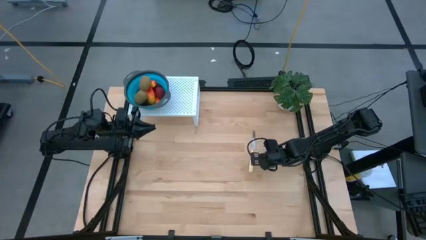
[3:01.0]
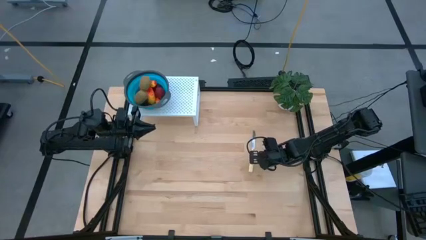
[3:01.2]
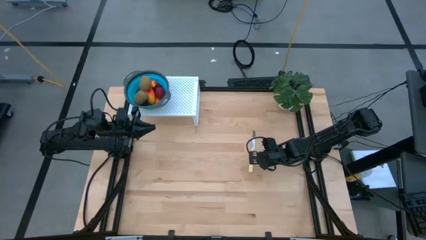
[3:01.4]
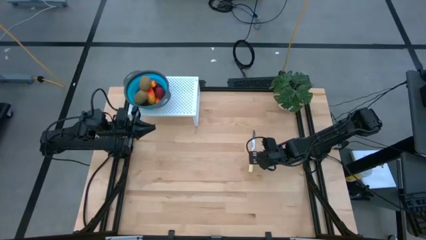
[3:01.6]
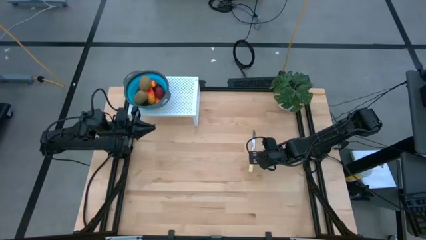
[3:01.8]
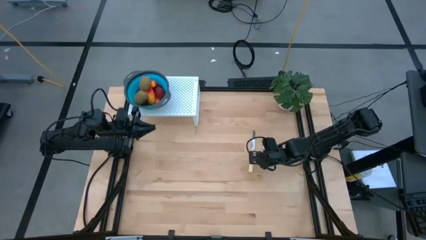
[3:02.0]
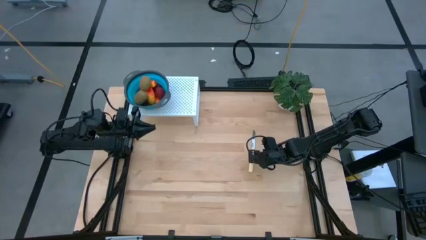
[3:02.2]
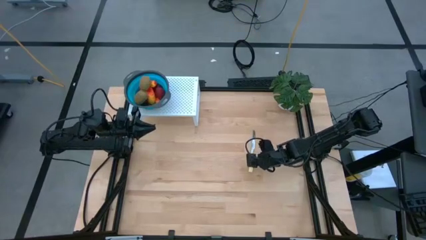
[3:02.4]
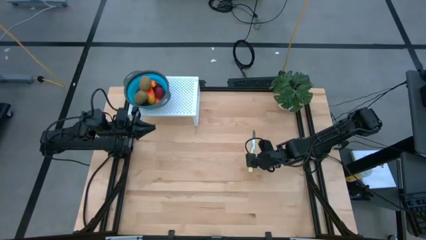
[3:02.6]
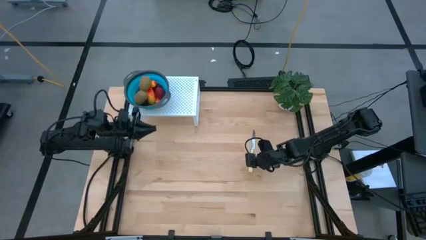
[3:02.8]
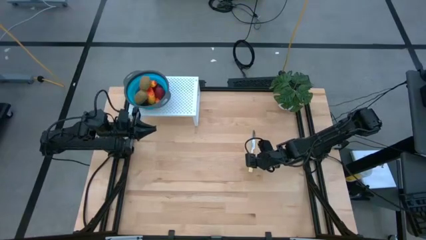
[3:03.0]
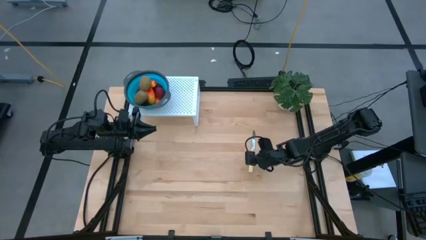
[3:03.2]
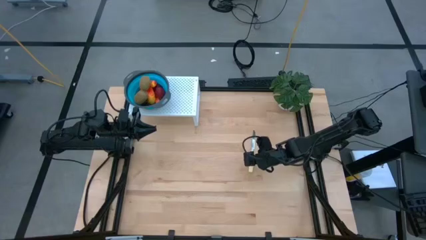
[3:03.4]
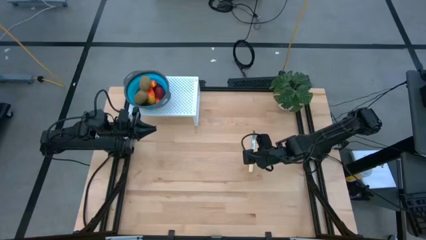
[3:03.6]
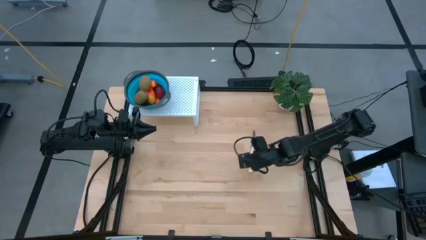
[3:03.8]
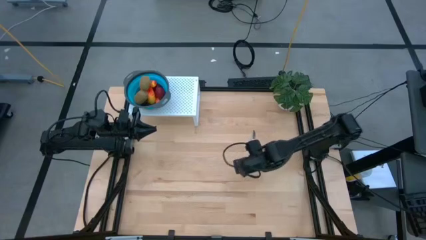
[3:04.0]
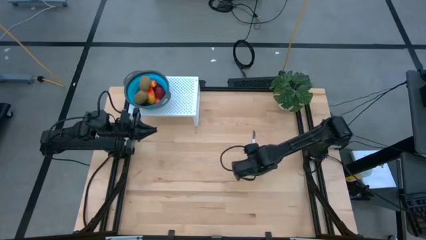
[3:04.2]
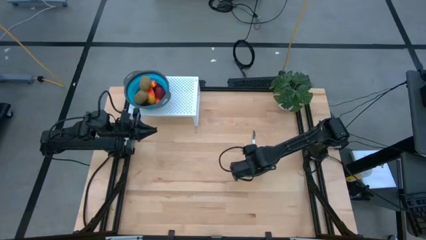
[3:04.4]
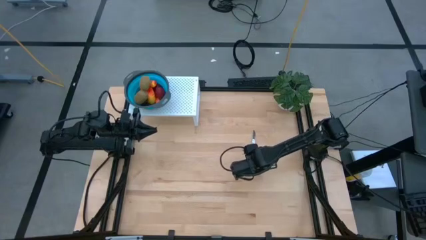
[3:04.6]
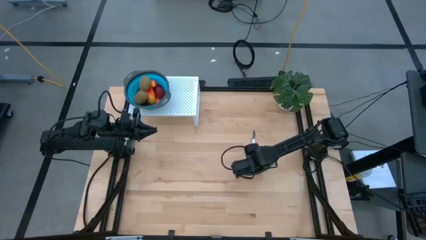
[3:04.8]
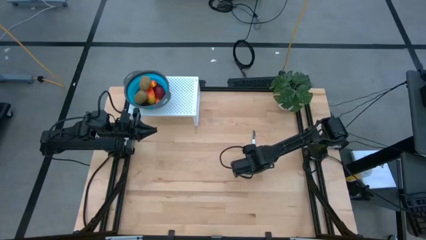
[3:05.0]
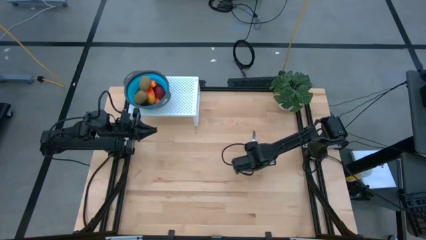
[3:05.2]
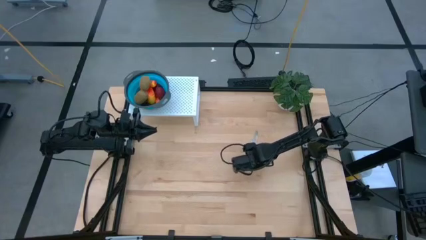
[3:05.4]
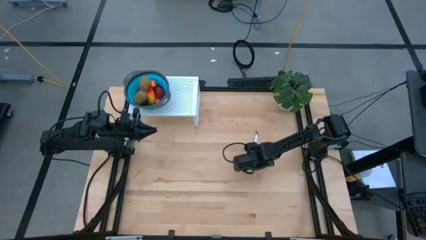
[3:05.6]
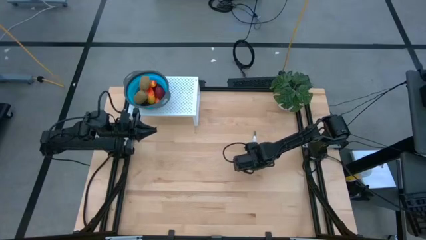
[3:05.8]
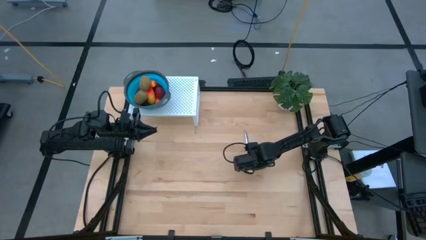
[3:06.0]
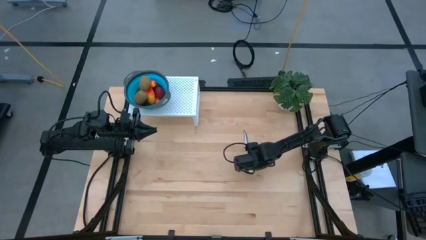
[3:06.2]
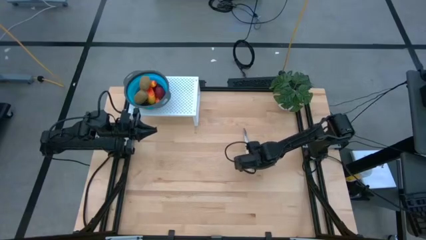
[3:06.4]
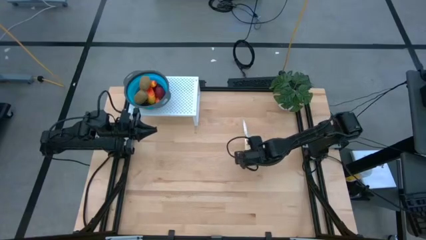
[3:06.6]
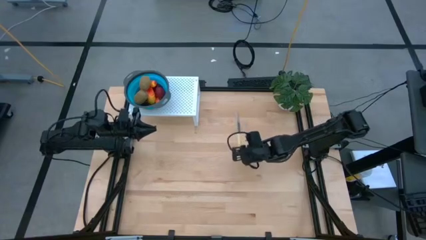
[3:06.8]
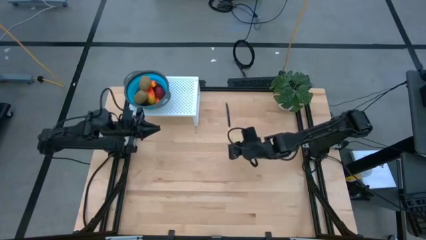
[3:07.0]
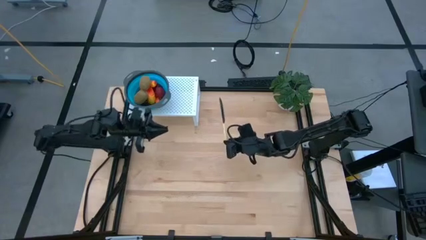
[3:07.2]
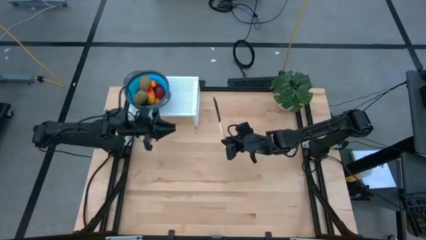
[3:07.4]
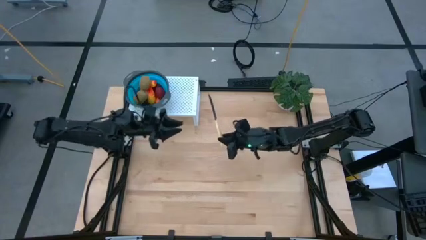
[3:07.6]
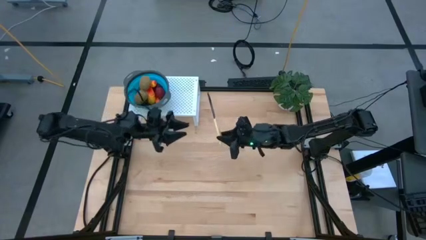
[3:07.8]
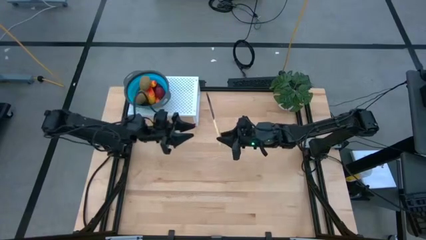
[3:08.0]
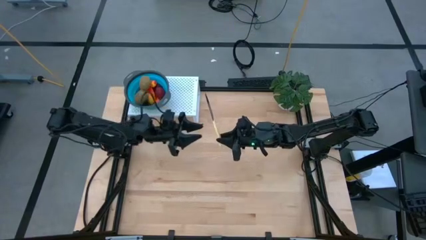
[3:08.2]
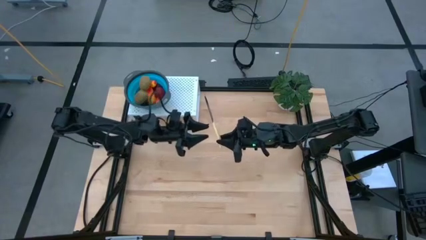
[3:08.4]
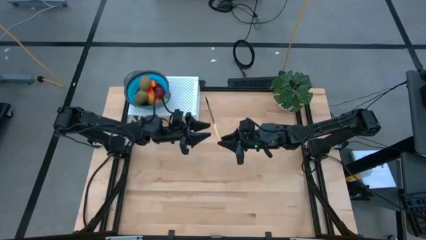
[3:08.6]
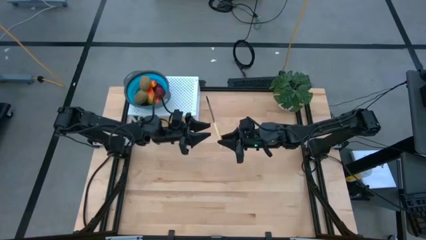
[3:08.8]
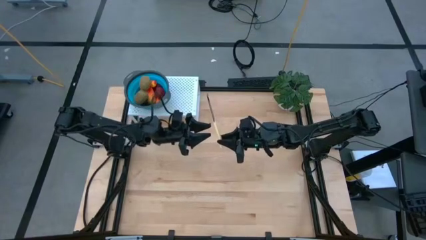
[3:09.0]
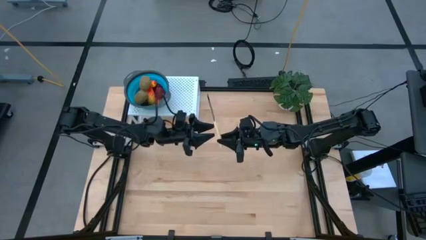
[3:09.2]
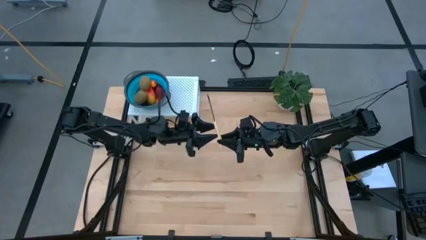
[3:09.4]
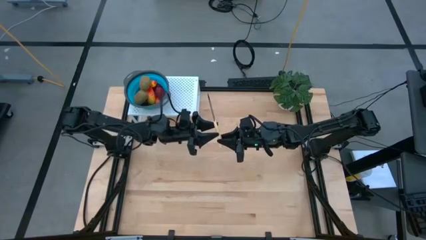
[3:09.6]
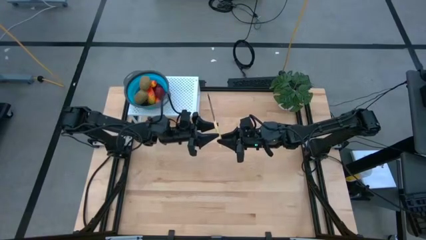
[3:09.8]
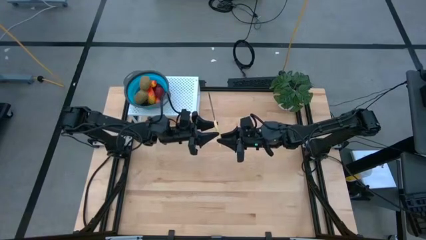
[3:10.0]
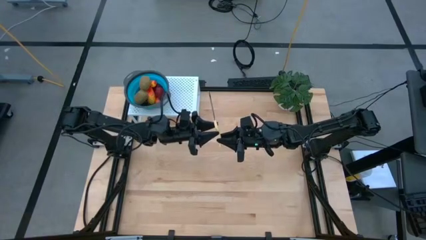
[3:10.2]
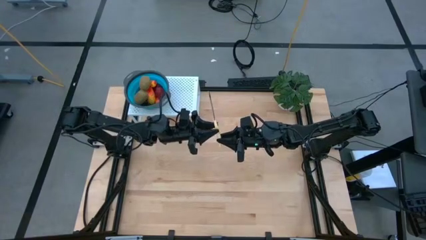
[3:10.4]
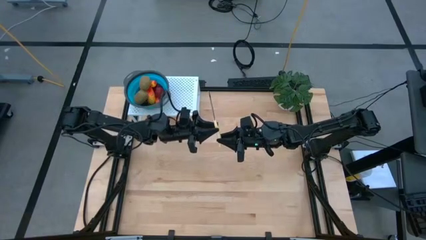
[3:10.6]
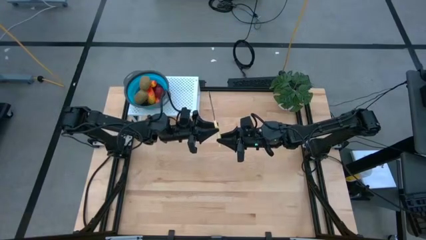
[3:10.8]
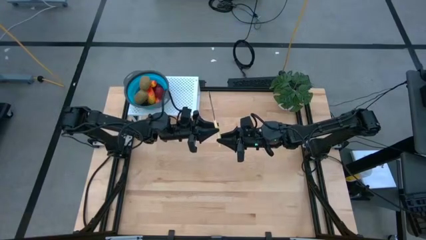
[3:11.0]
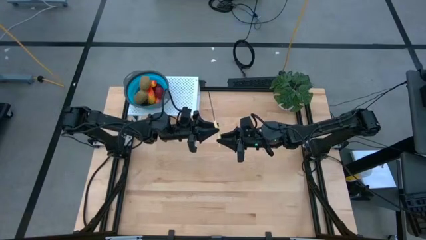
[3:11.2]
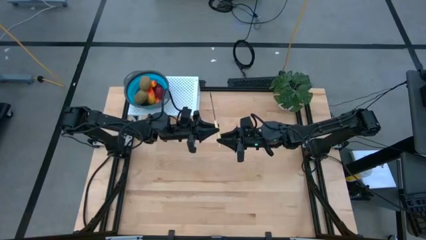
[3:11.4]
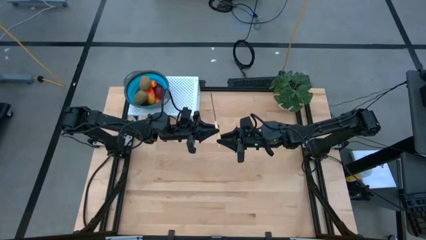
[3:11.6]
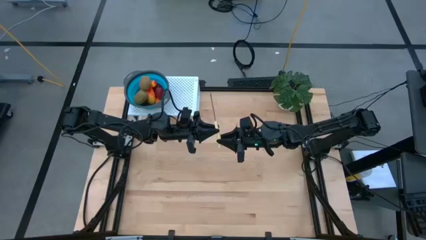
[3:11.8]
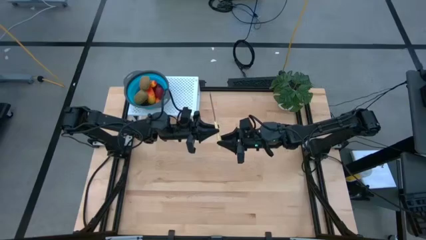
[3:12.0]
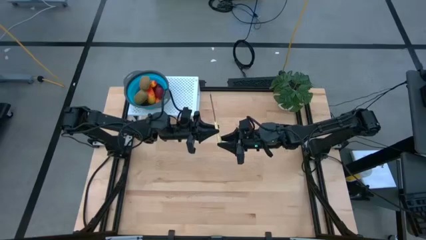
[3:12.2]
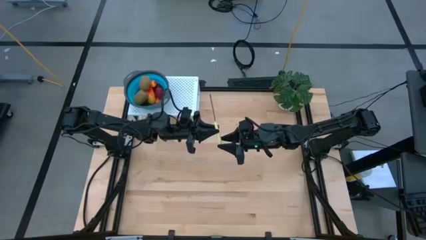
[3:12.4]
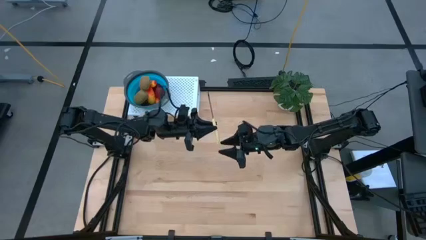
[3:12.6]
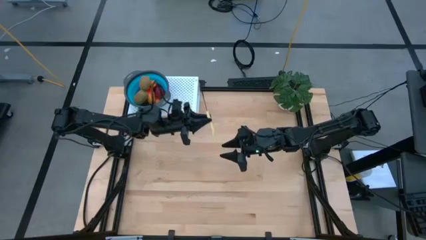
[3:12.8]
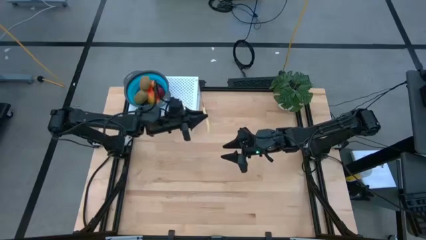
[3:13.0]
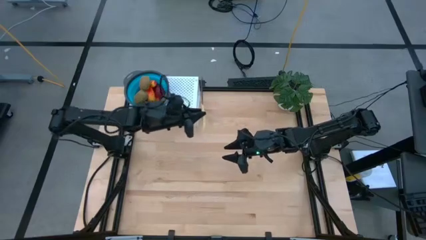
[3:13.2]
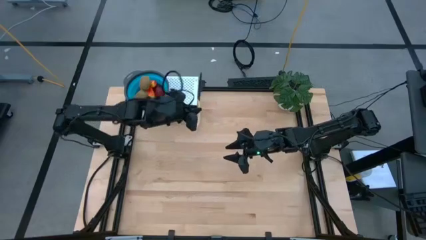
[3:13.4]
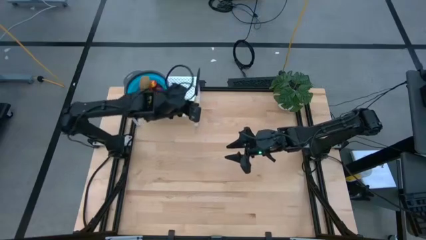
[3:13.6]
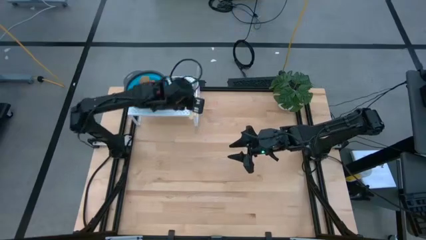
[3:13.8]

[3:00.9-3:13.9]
Task: Pick & Place Fruit
Put the butter knife into the right side of the blue strainer bowl on the shelf

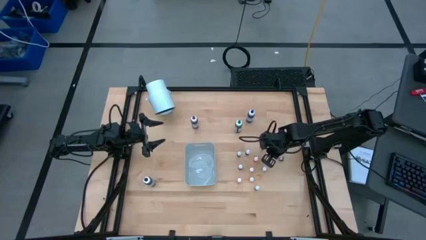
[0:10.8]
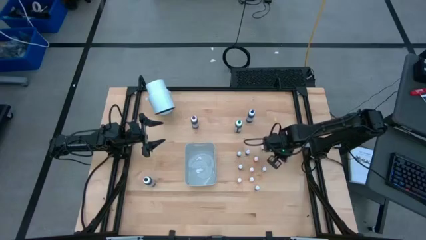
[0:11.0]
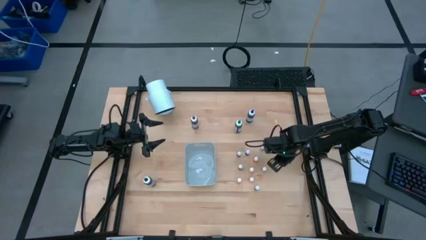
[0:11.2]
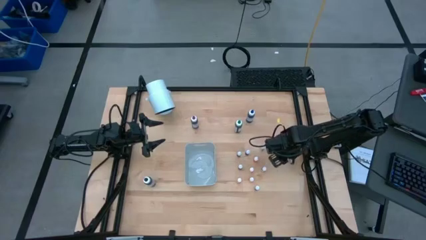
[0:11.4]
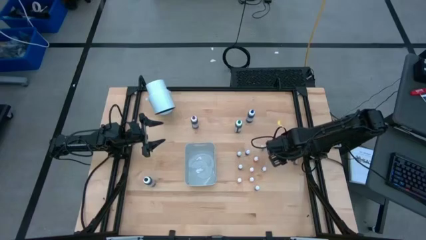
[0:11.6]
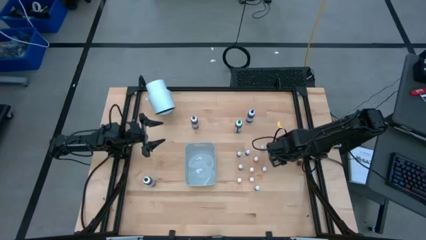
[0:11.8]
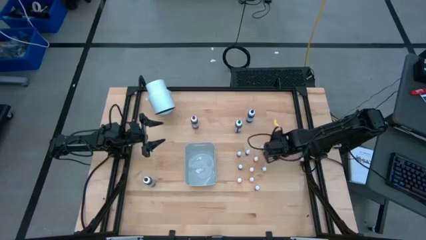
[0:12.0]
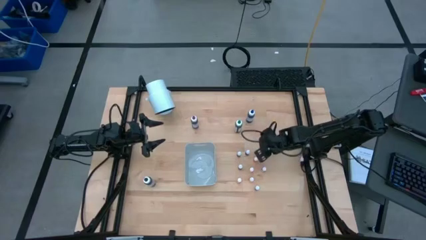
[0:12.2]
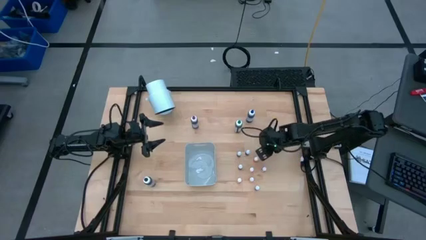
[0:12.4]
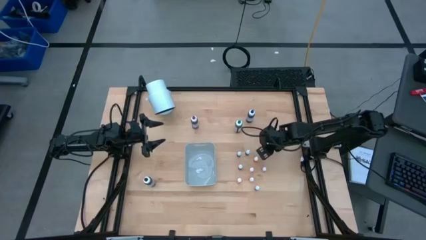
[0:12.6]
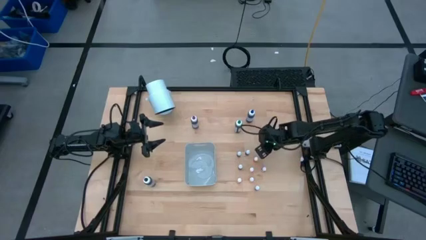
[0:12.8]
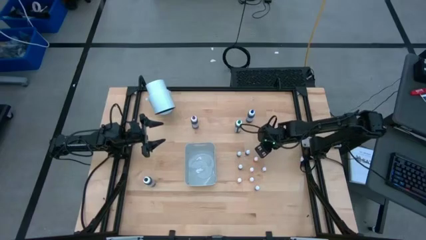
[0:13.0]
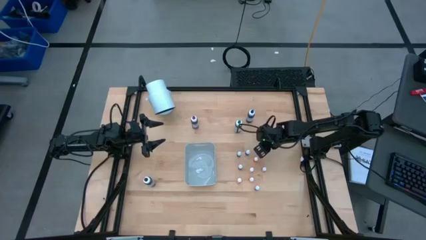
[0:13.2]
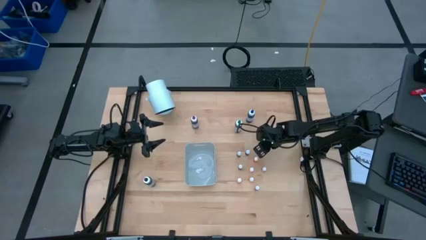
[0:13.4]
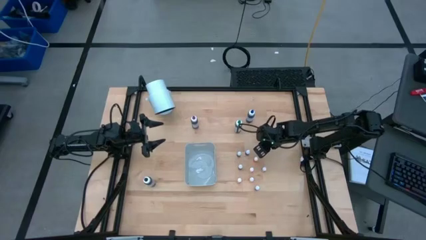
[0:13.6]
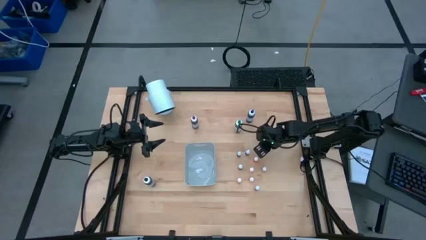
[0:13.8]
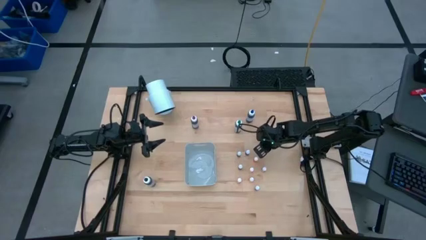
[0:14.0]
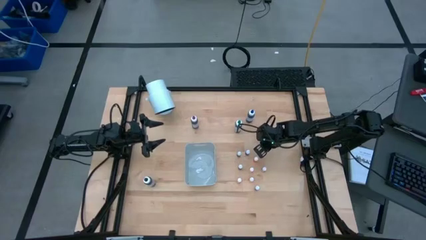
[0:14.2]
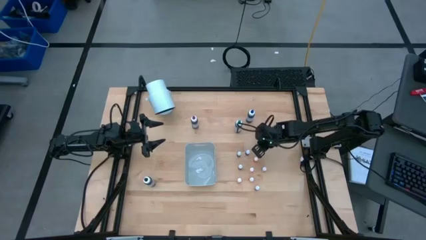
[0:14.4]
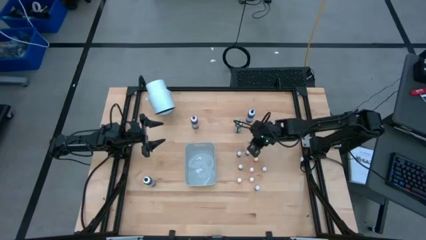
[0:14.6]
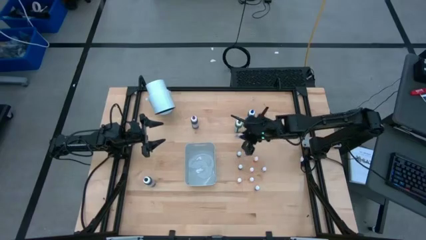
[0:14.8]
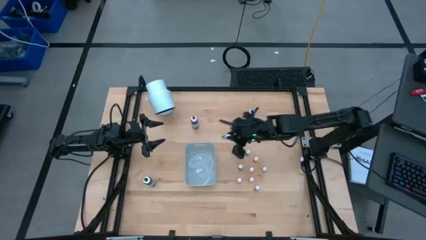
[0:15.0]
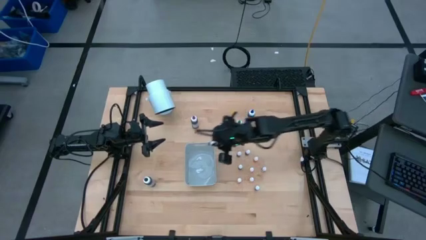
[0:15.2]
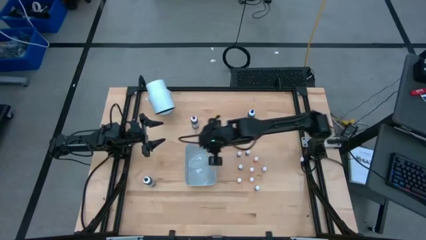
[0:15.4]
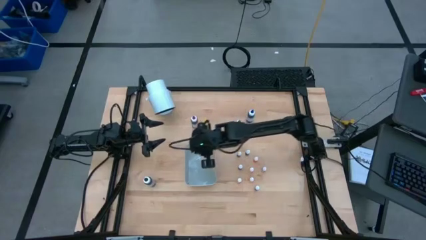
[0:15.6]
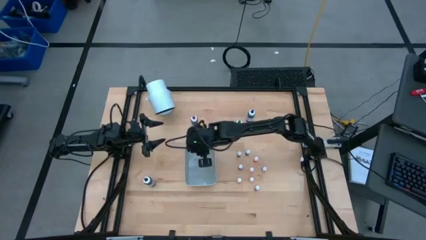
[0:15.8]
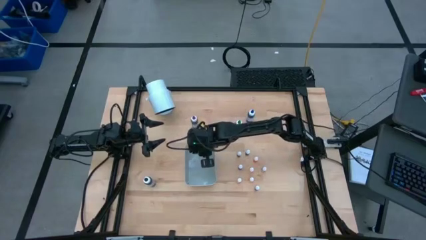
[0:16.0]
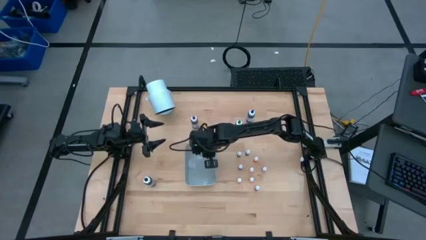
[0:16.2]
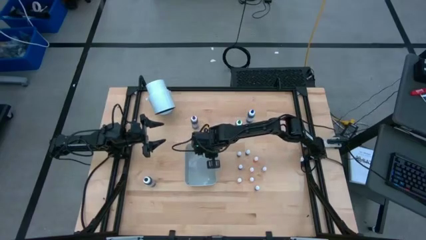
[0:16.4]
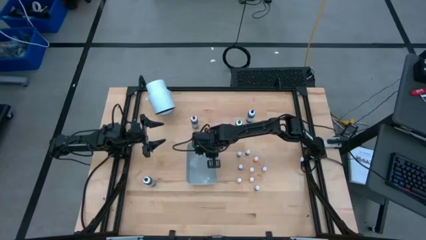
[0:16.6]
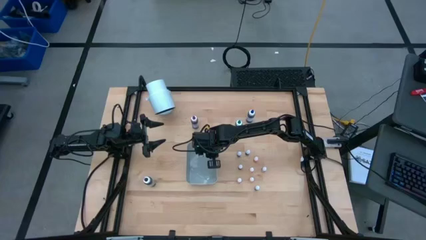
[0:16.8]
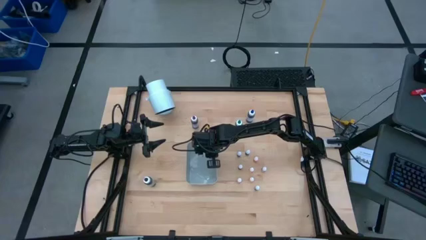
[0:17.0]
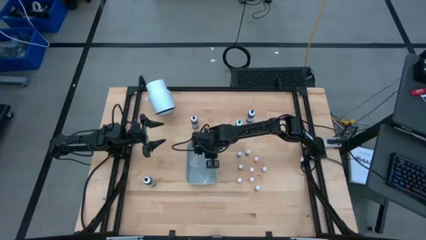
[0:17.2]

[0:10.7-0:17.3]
Task: Pick & Place food coloring
Put the green food coloring bottle into the bin
